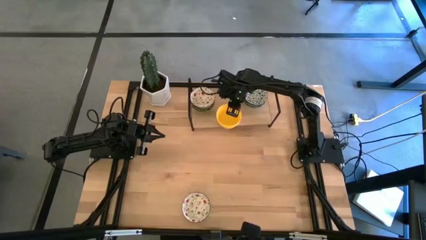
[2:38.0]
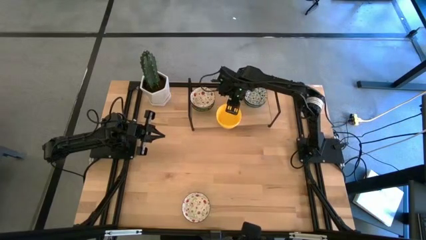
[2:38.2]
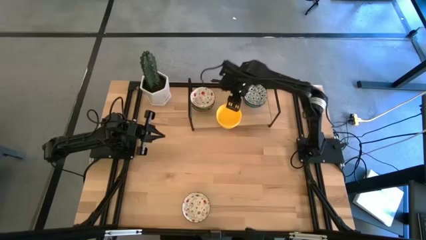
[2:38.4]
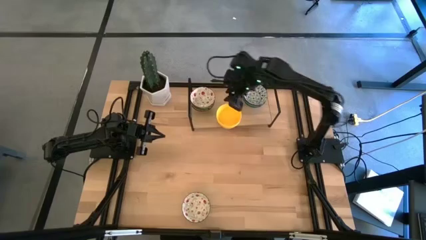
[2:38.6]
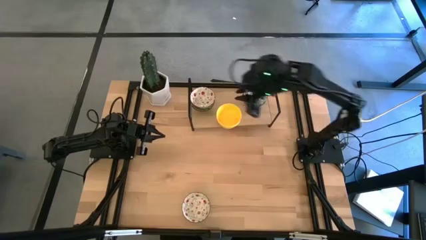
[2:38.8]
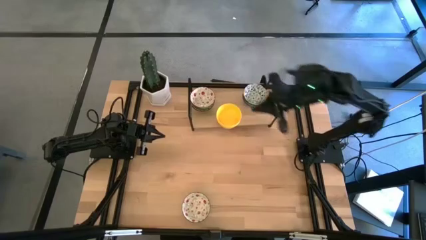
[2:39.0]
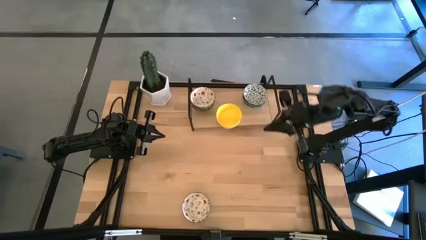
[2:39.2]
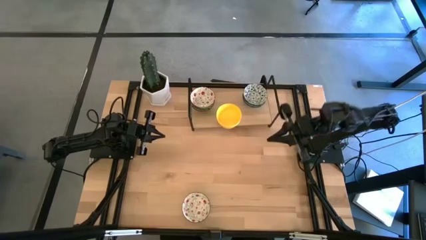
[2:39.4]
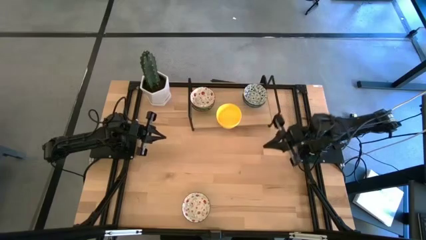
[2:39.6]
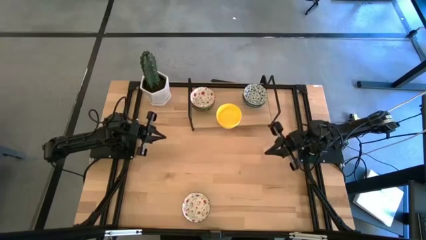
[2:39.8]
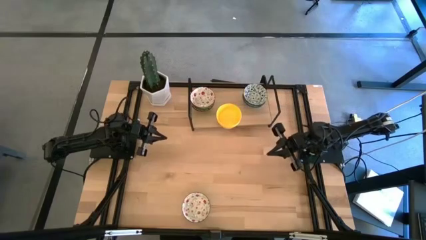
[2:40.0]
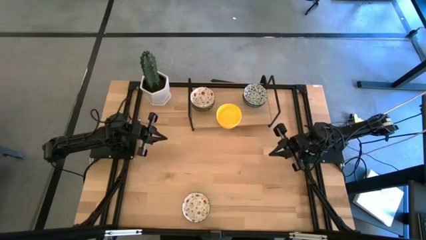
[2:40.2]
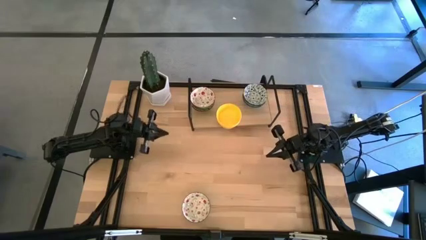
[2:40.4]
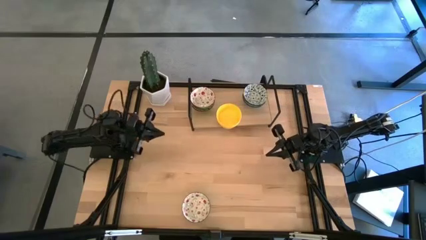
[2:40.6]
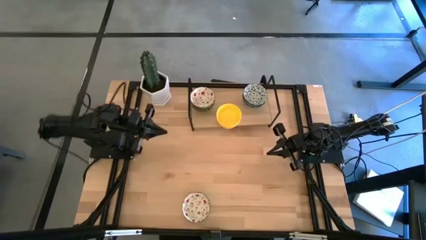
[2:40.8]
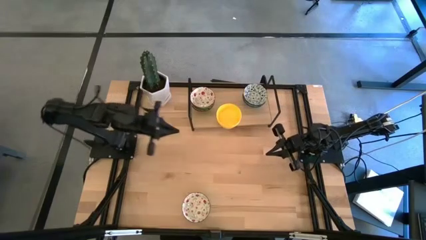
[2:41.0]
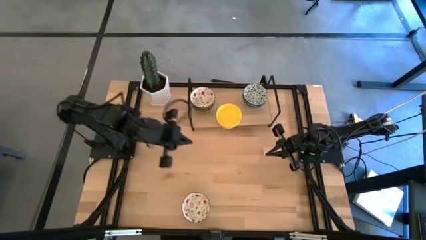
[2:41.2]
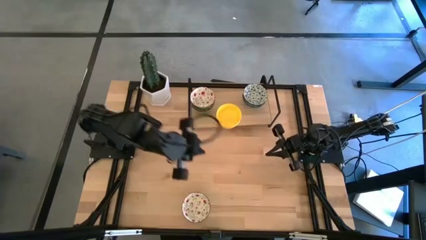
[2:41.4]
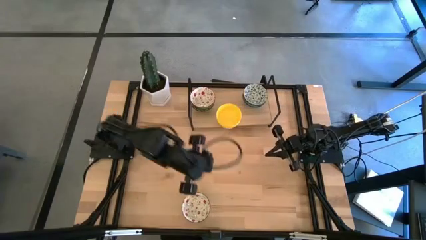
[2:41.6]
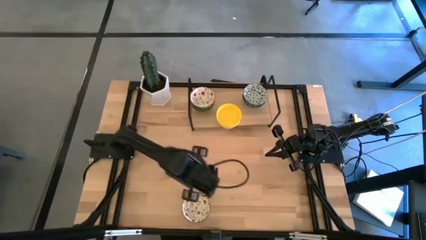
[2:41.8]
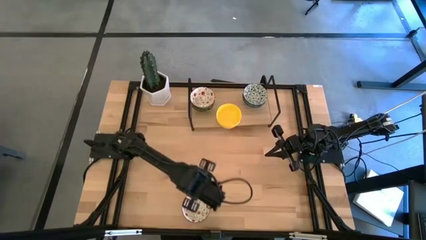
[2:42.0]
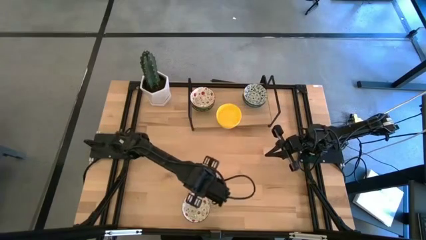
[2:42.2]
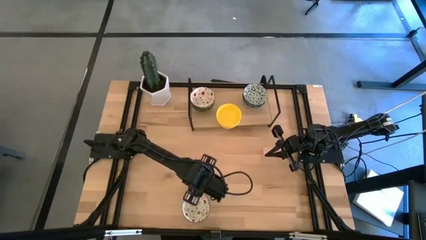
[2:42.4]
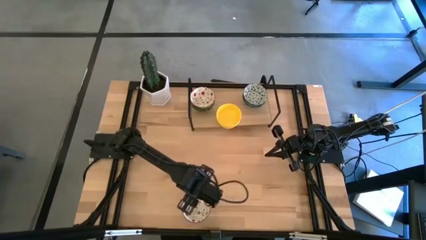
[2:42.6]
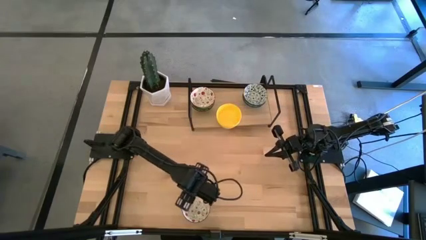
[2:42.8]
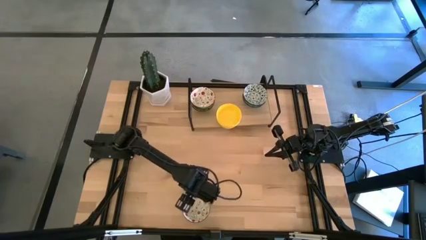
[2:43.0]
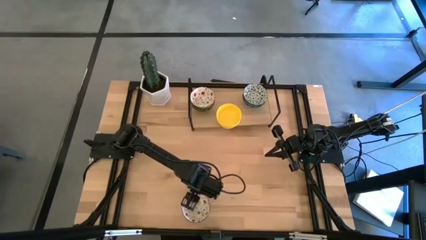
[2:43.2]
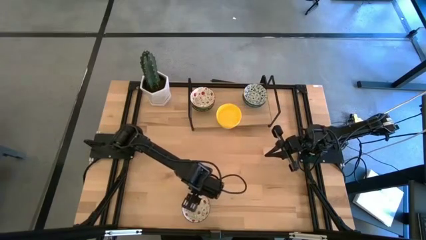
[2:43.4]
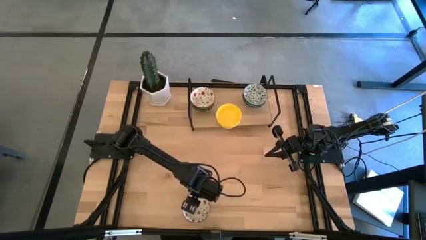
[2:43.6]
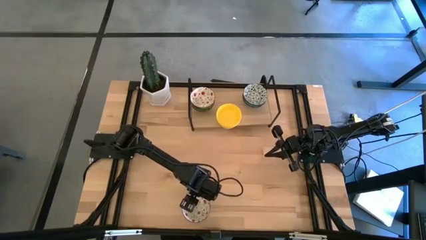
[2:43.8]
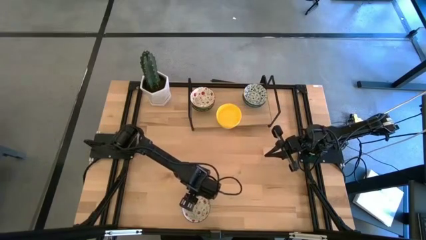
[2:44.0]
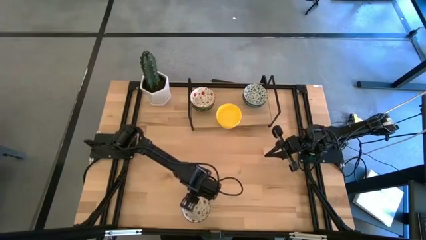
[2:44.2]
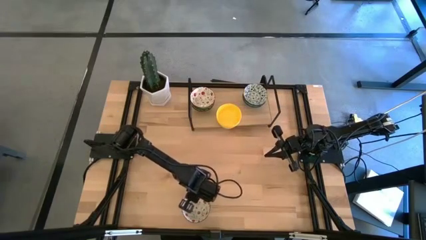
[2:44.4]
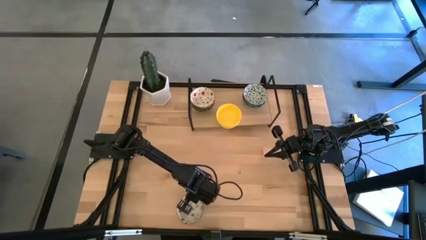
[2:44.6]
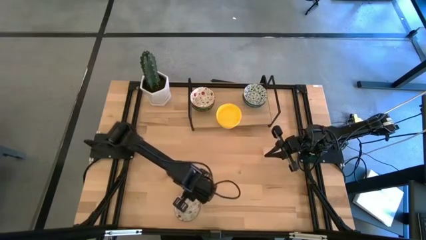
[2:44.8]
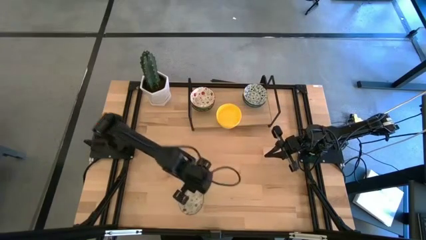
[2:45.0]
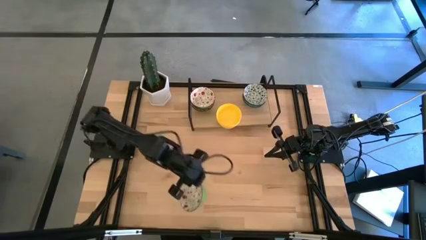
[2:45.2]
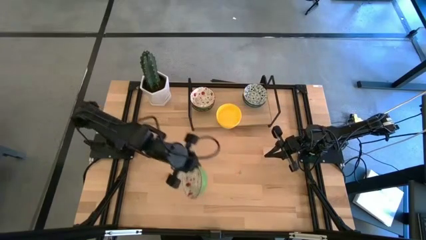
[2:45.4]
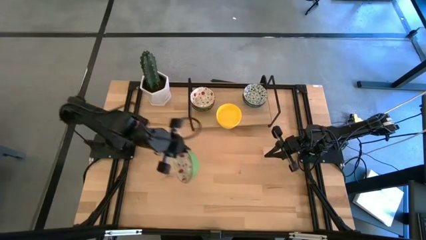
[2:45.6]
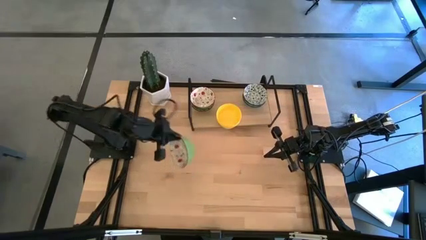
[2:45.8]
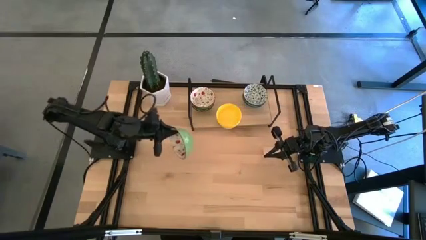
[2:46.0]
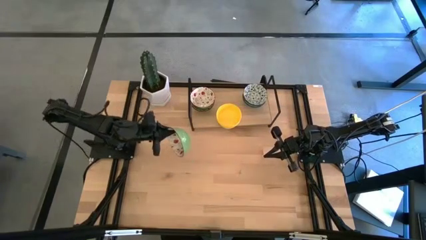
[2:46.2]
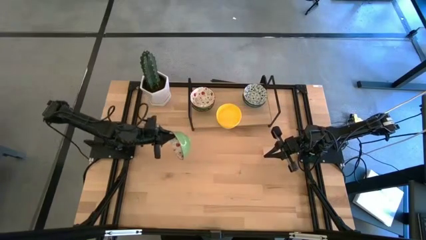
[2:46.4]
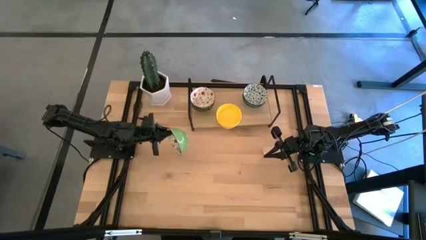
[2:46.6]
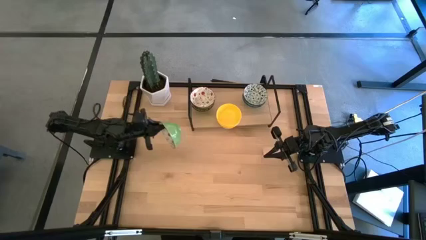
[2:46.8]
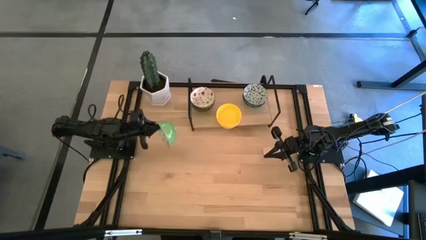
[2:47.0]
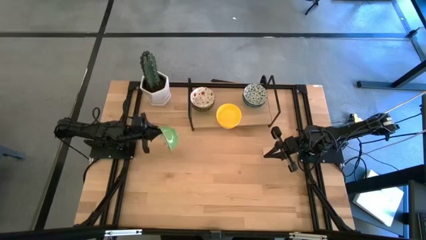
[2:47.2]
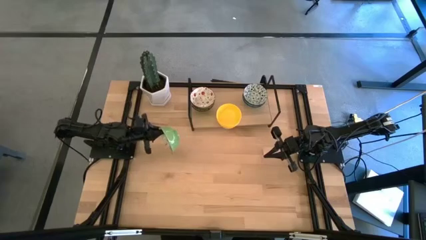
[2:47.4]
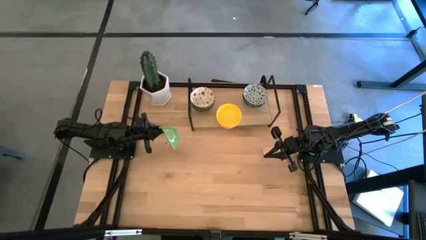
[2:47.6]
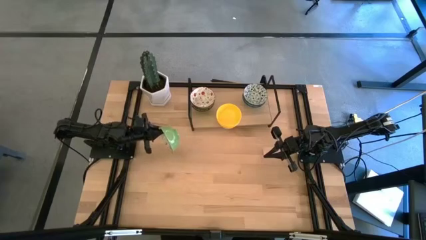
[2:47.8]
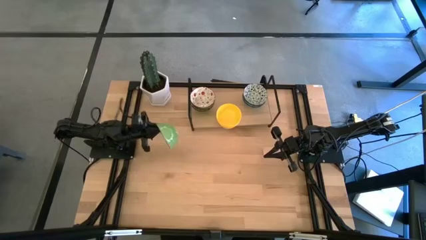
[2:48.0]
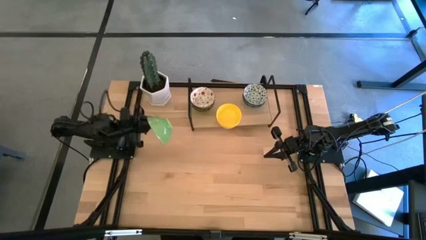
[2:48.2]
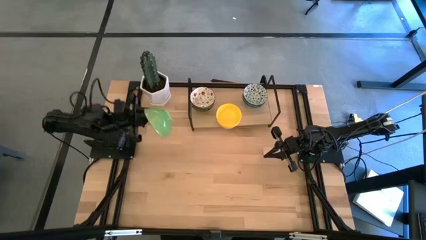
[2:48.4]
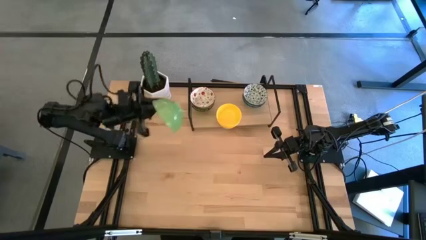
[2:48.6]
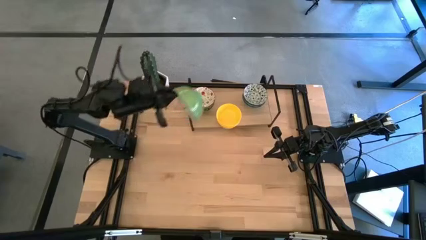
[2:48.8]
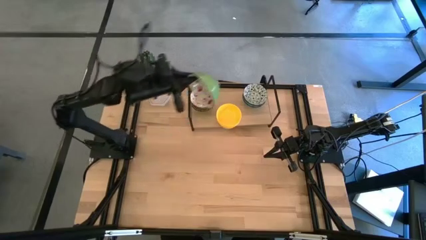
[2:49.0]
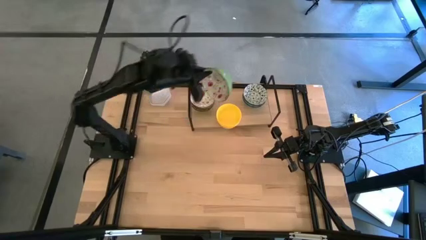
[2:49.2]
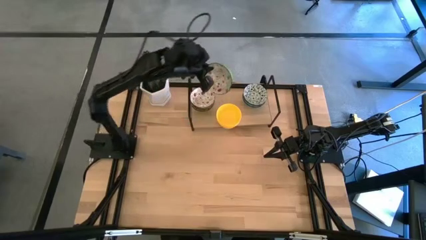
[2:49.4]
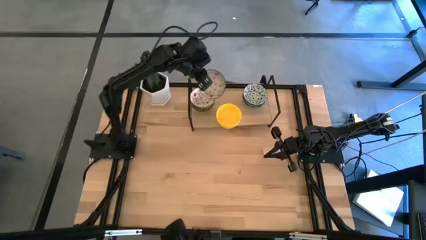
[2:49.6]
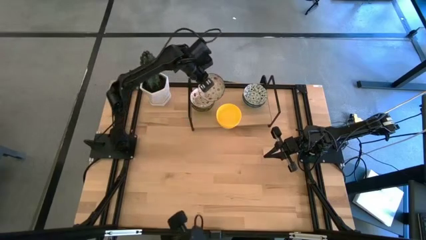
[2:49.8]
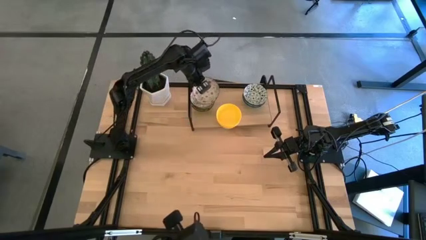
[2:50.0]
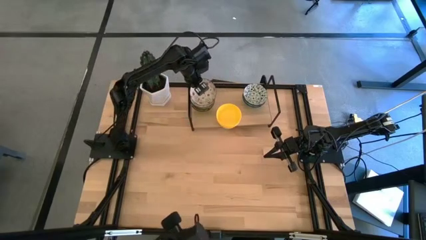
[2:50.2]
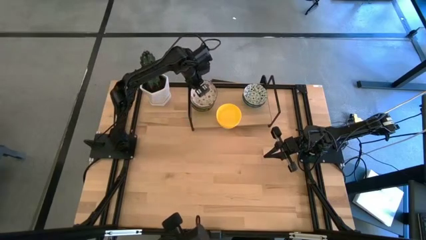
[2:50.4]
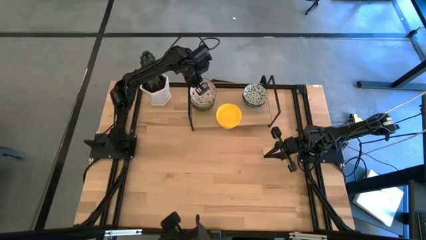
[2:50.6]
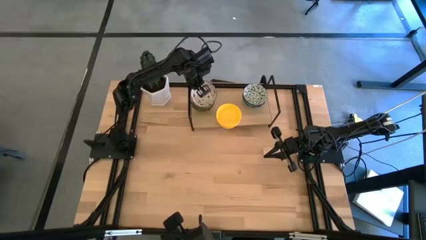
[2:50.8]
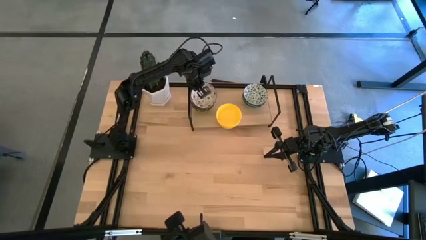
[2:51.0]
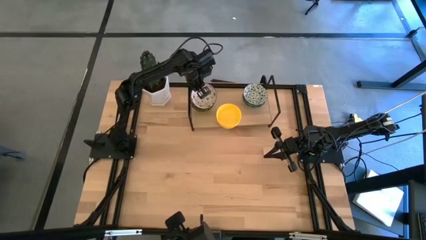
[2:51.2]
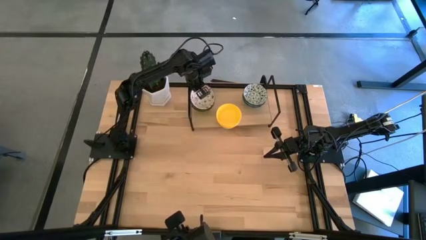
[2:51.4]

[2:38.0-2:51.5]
Task: Pick & Place Mini bowls
Stack the green patterned bowl on the green patterned bowl on the shelf
